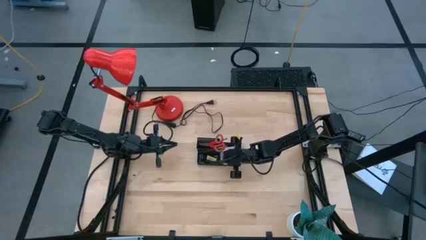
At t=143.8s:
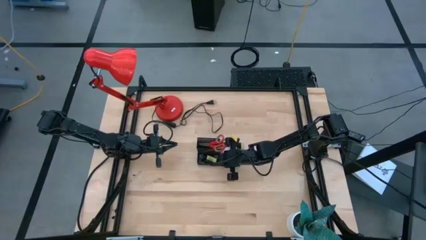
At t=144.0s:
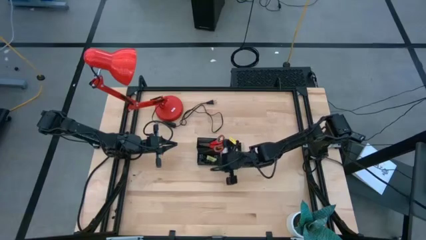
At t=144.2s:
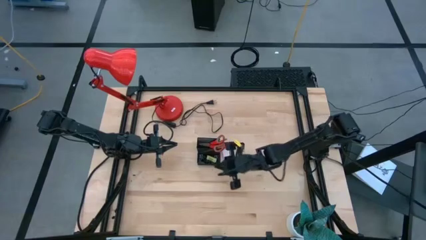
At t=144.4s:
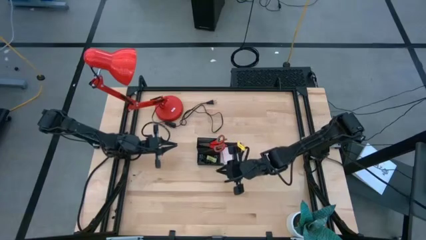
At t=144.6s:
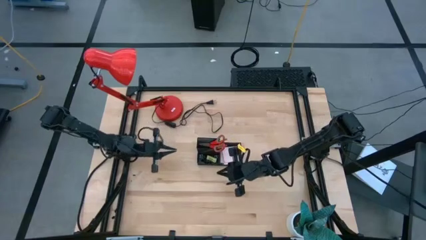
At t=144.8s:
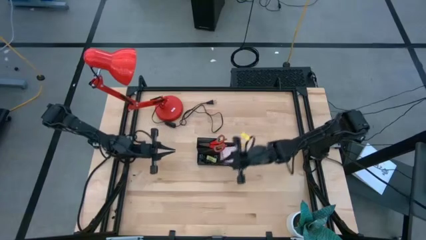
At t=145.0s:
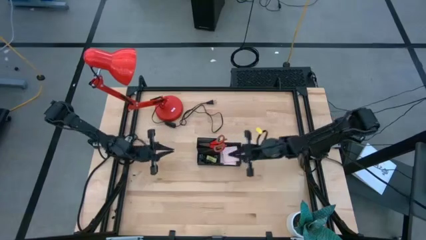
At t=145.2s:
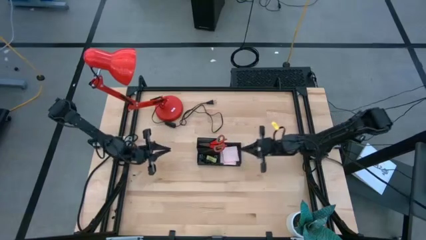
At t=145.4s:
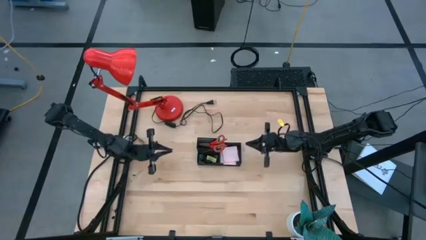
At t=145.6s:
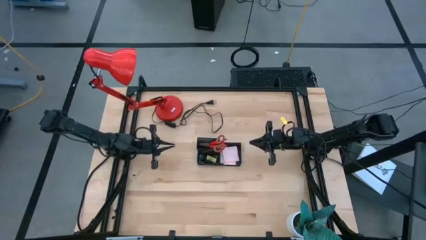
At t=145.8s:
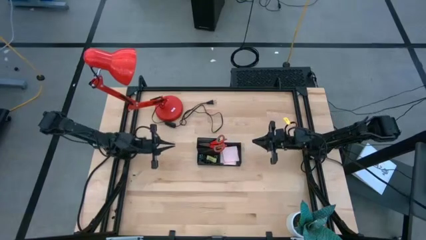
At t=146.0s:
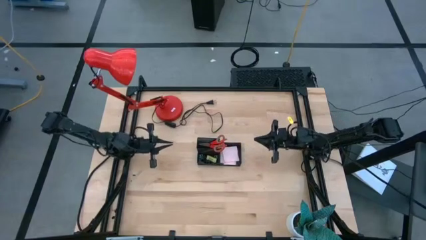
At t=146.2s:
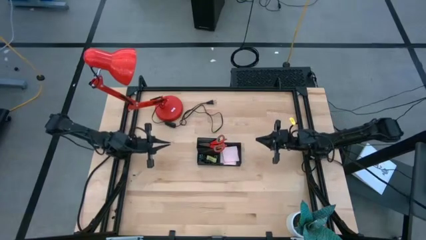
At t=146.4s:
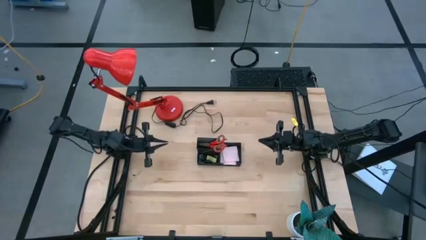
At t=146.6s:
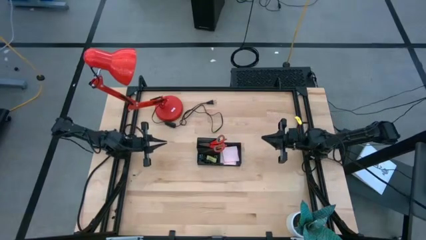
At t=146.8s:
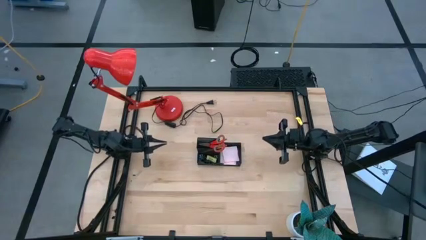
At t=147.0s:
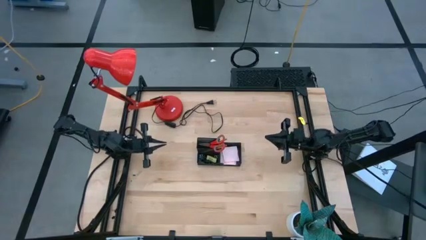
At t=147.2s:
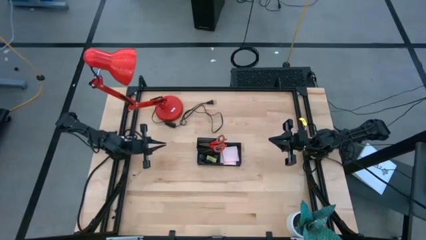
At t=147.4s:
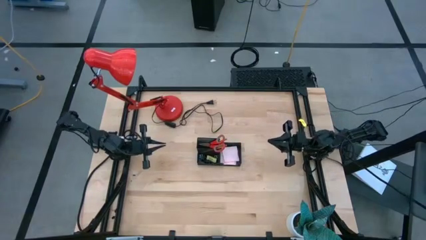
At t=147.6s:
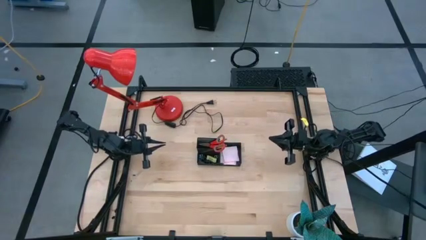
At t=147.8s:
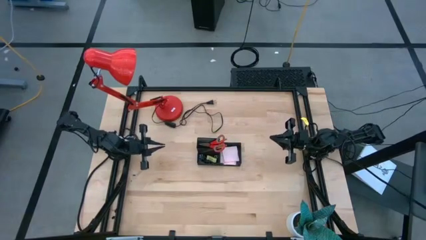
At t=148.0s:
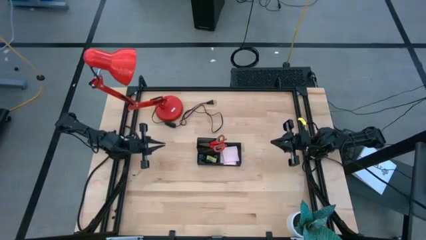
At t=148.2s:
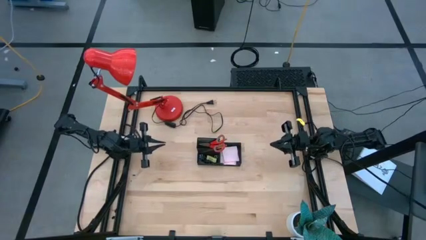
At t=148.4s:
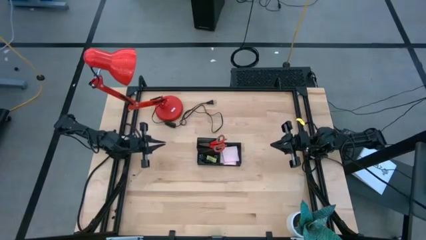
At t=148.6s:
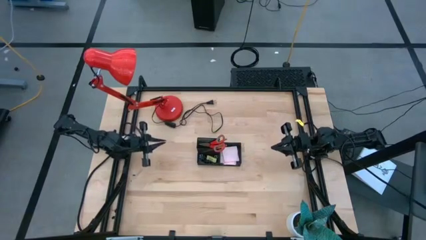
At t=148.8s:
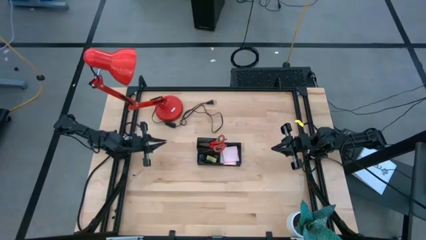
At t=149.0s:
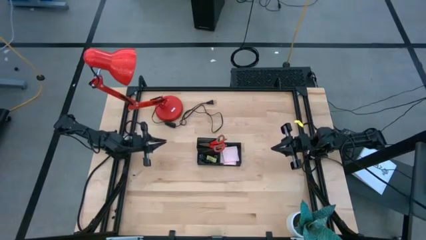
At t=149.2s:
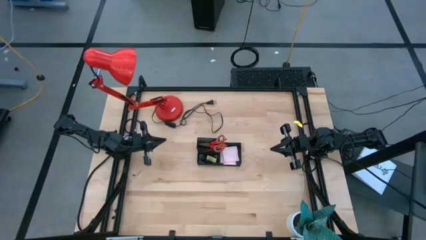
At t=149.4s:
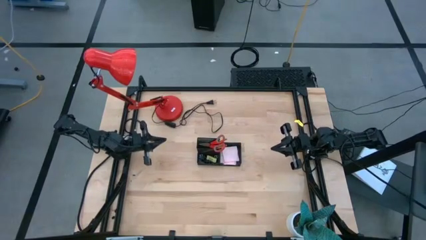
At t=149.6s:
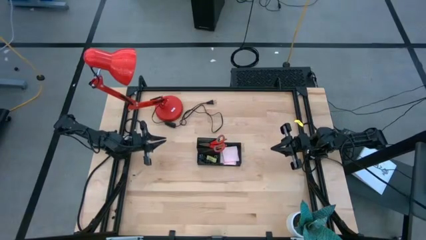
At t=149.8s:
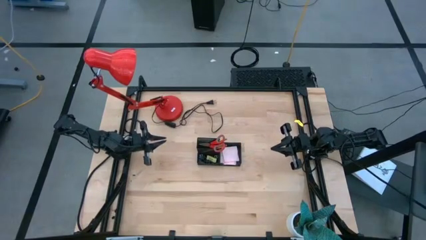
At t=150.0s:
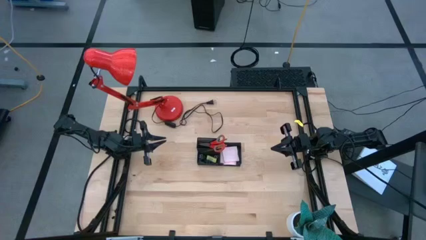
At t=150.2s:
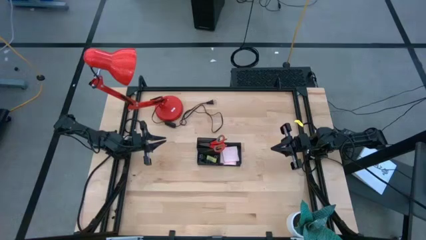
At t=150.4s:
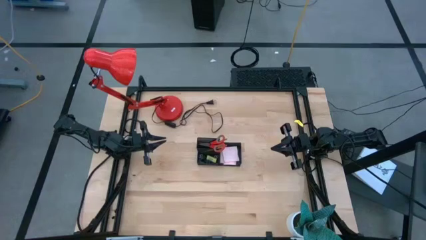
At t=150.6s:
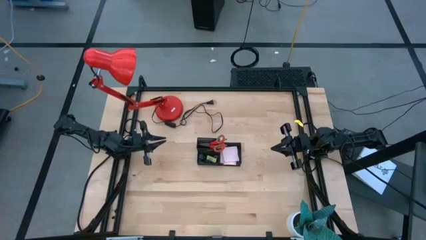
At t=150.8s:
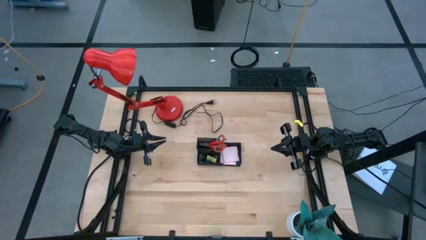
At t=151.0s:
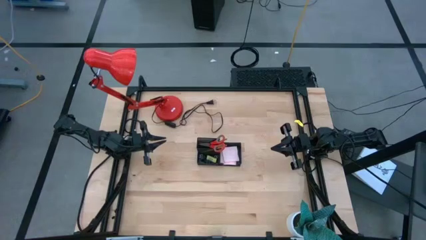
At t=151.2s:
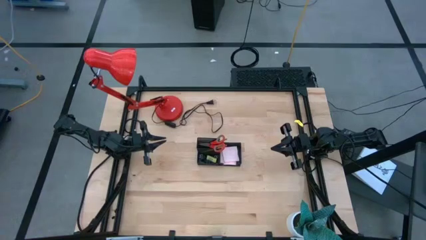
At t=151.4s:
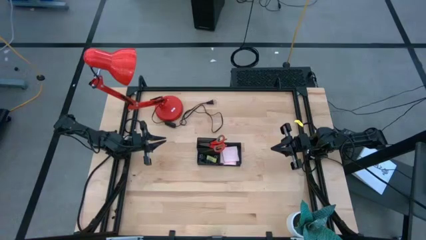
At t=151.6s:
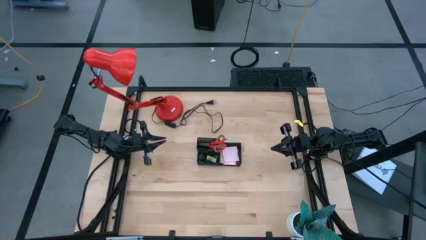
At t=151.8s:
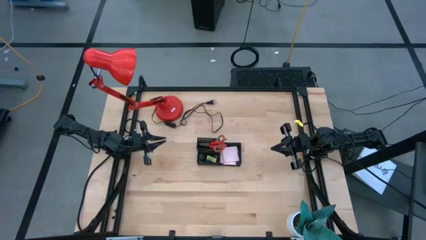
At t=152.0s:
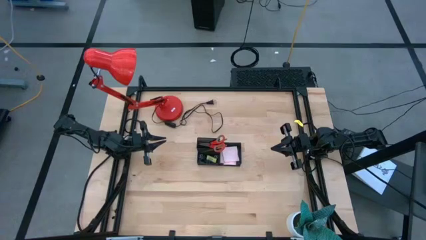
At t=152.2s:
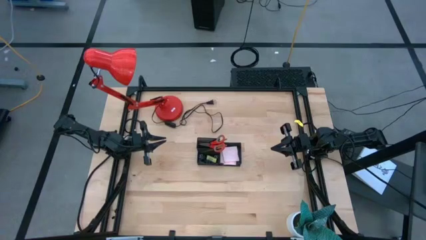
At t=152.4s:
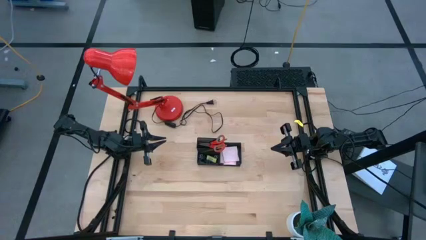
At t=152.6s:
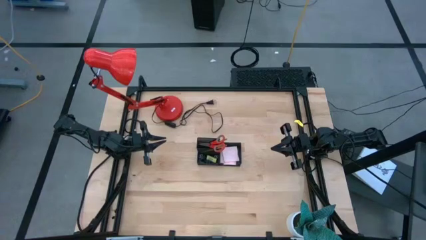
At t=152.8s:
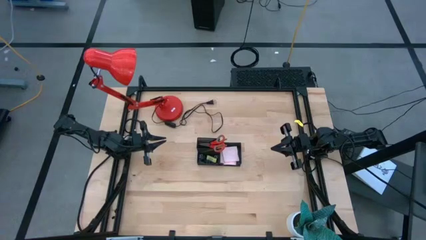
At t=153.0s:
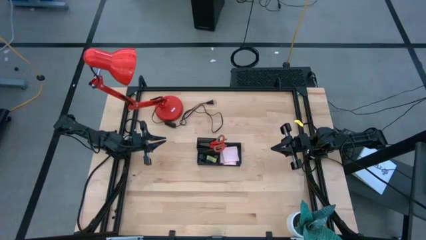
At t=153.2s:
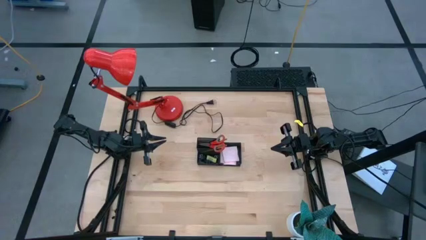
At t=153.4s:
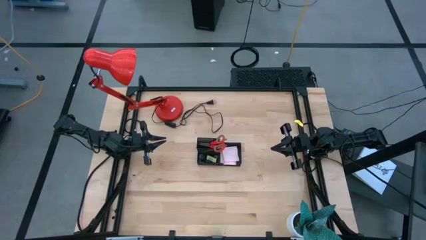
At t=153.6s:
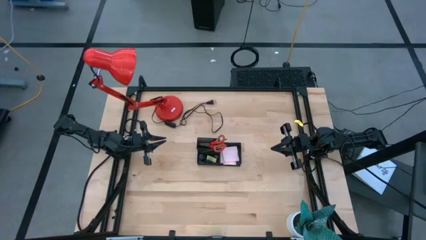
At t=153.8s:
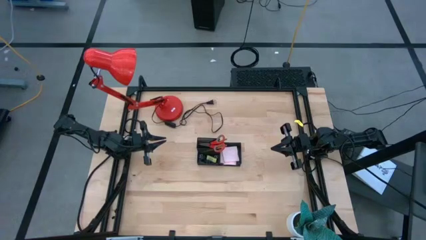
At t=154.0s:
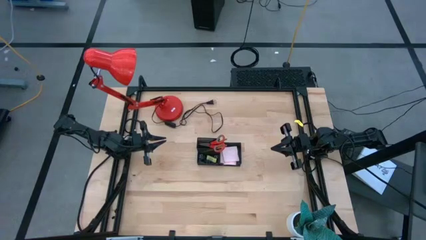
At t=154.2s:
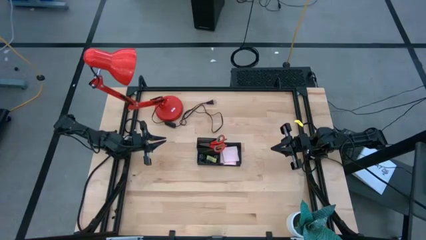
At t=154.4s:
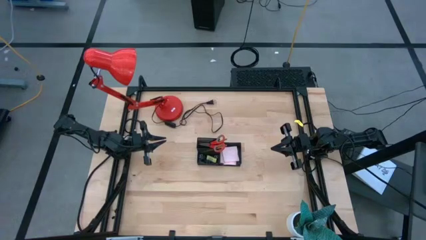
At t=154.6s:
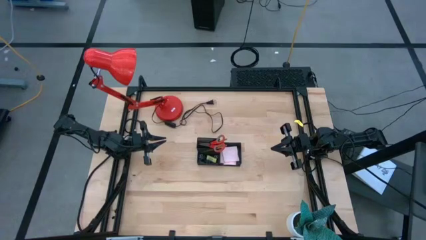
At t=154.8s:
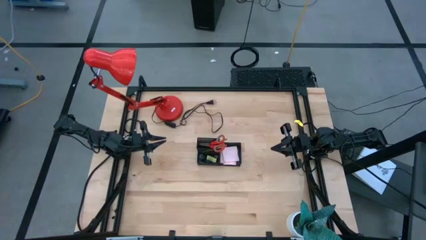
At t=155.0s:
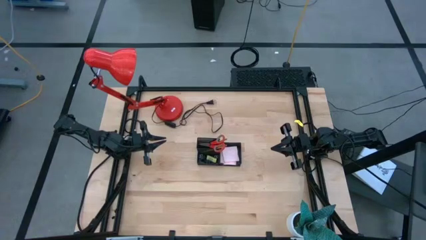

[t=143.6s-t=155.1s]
Task: Pick and place office supplies into organizer
Return to Home Position
